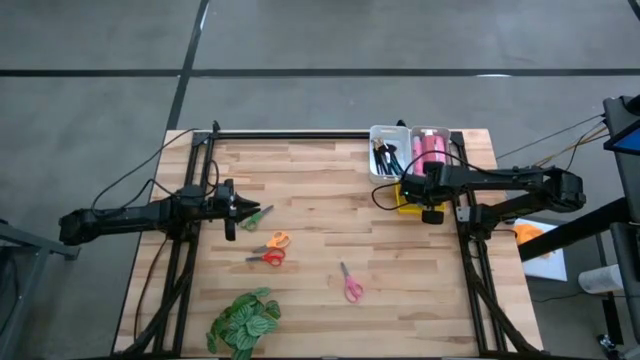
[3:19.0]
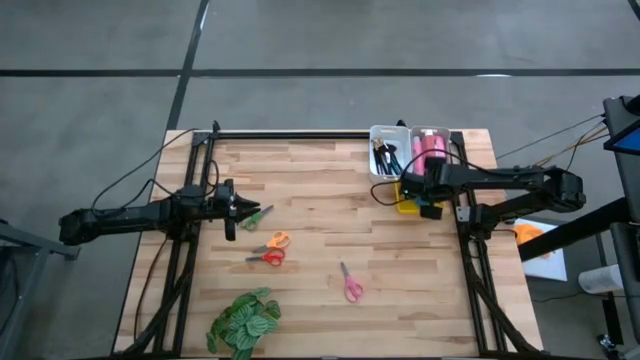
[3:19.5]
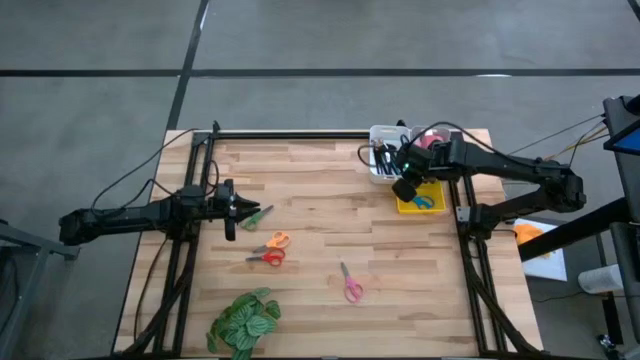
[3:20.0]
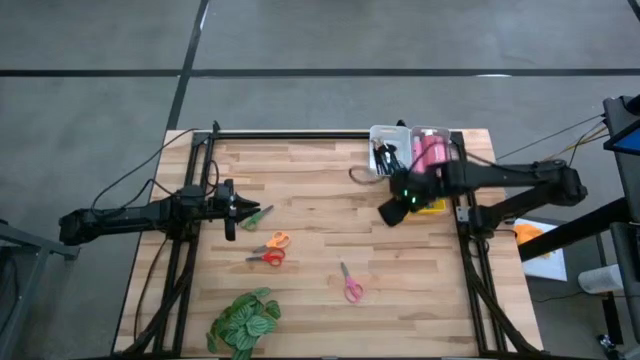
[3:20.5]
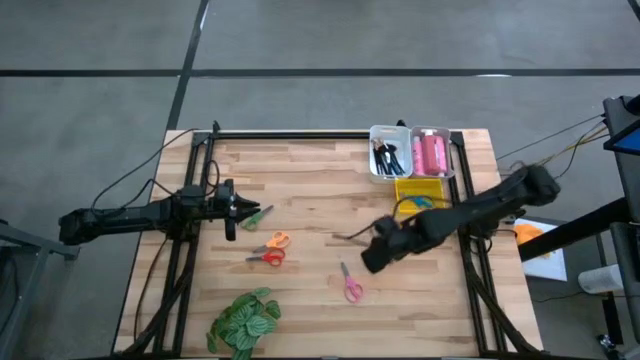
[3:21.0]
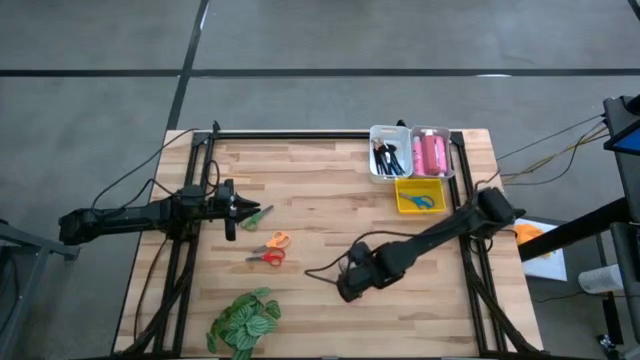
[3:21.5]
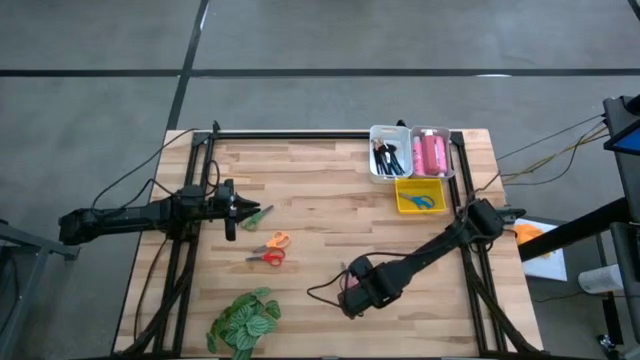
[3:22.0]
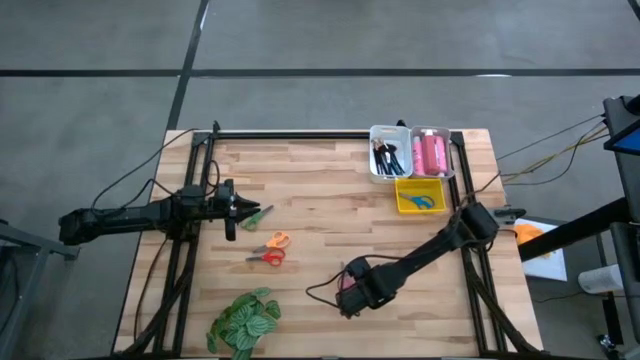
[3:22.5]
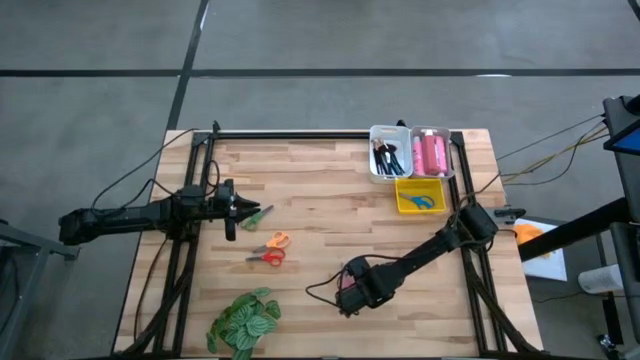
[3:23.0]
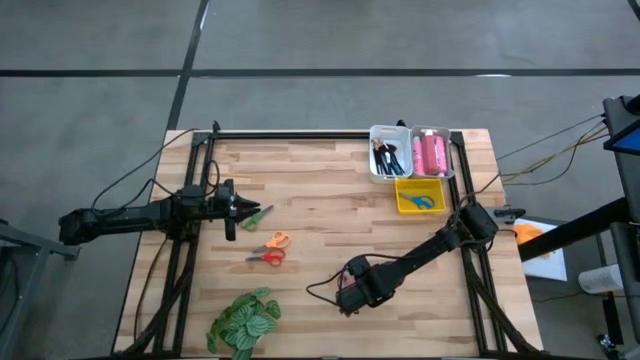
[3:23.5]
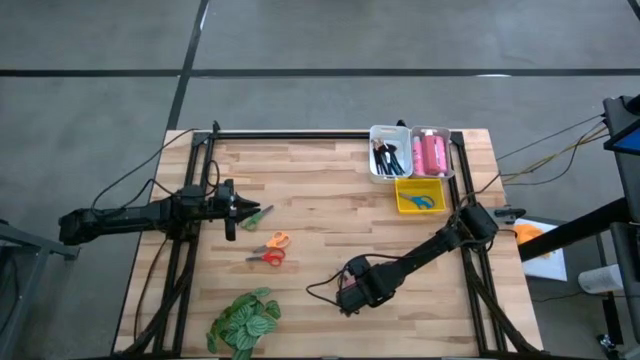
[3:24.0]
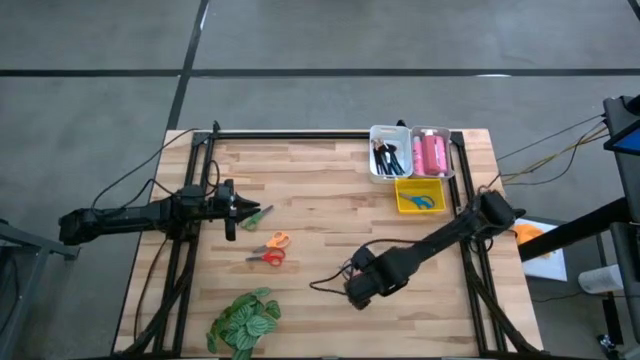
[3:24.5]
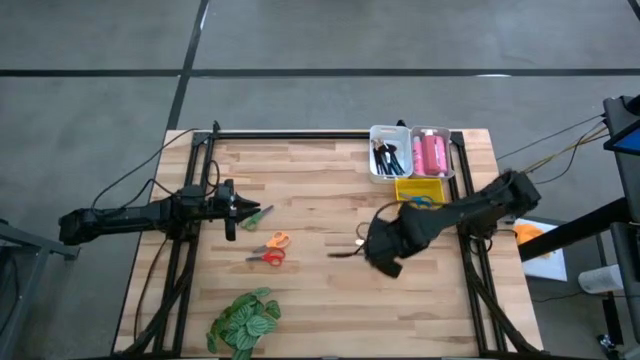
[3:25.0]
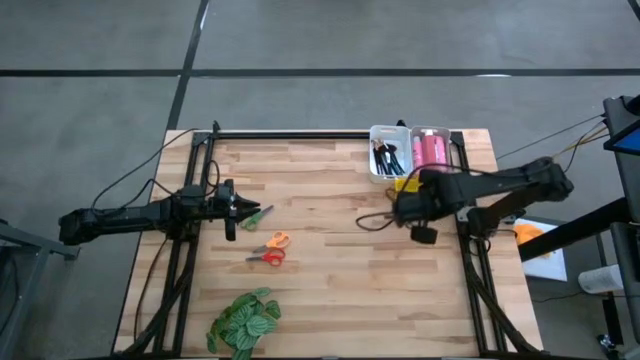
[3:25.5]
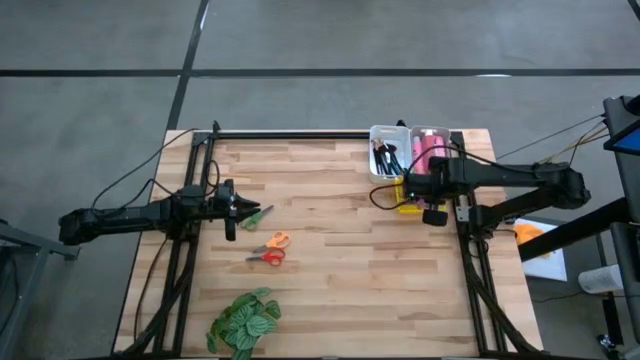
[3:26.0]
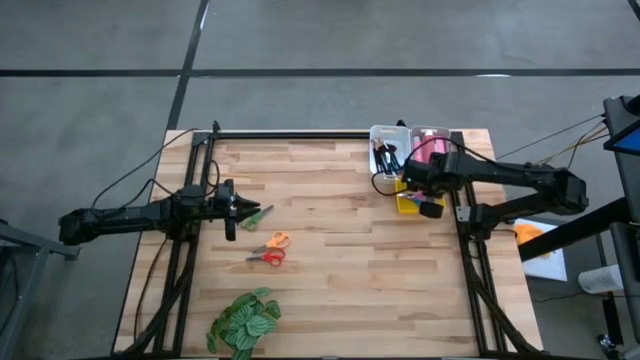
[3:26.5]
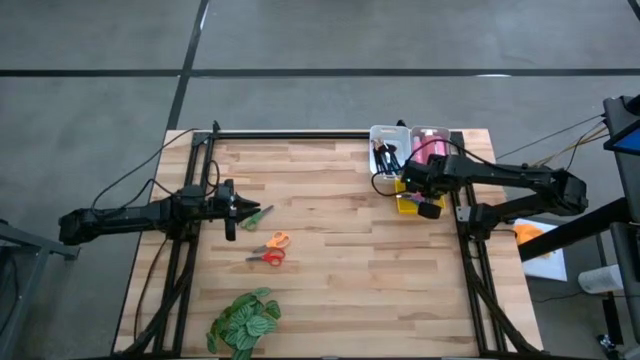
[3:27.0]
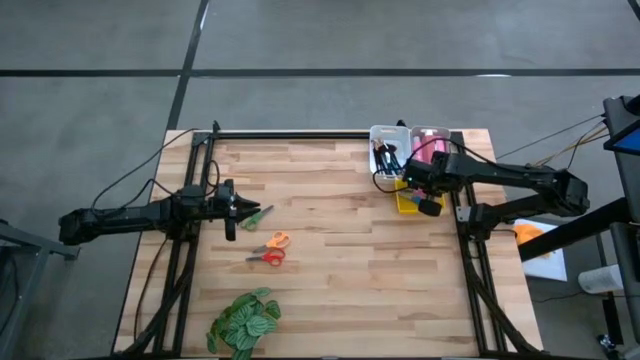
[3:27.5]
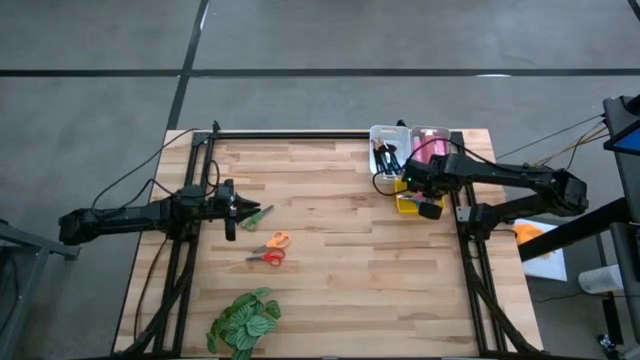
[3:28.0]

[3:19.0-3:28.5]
Task: Pick & Place Paint Supplies
Put the pink scissors into the yellow bin

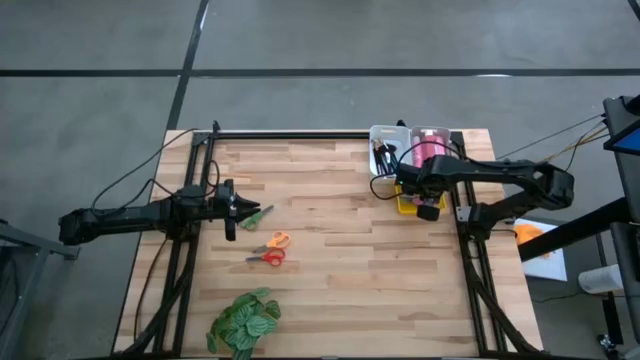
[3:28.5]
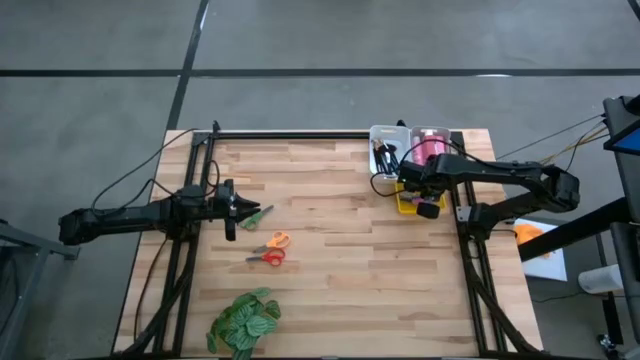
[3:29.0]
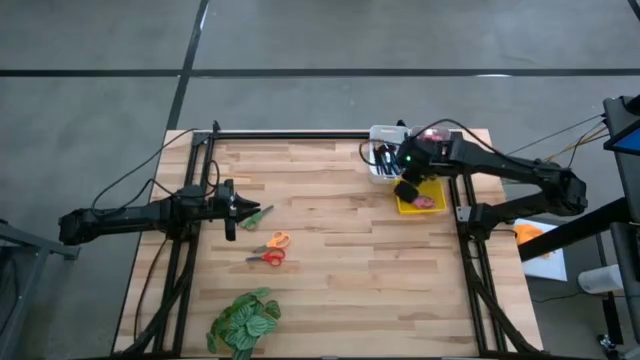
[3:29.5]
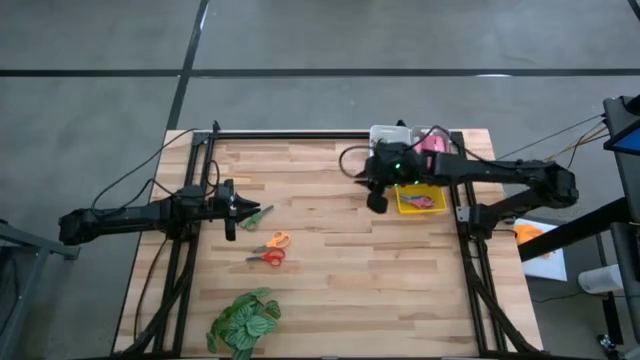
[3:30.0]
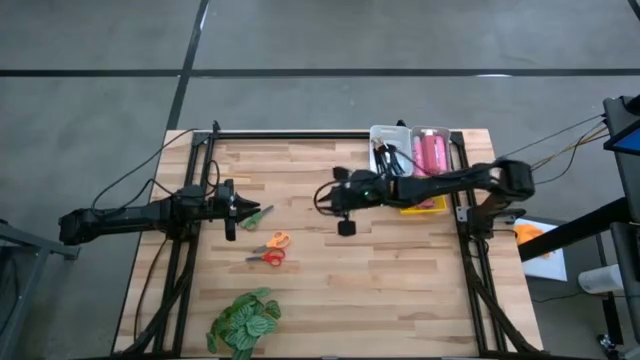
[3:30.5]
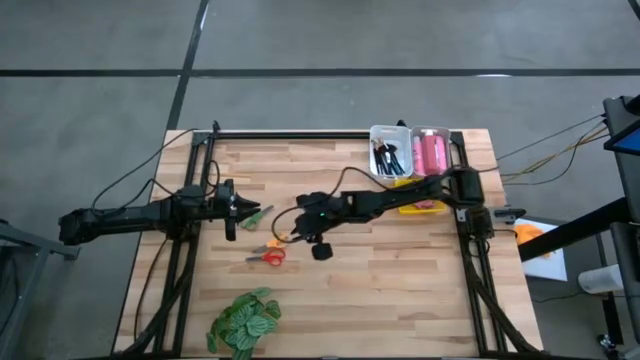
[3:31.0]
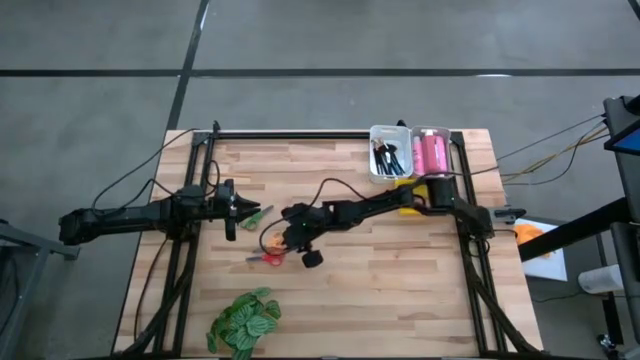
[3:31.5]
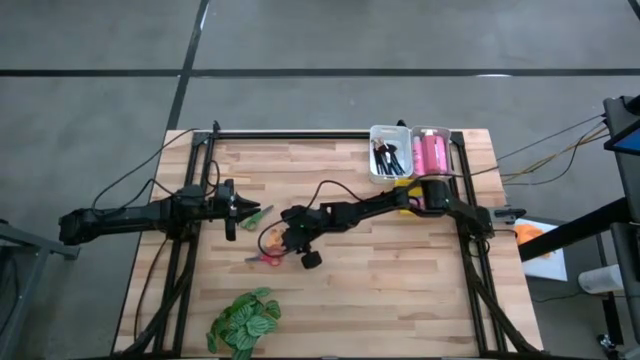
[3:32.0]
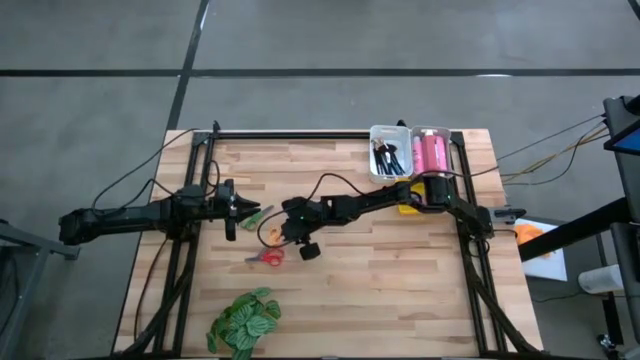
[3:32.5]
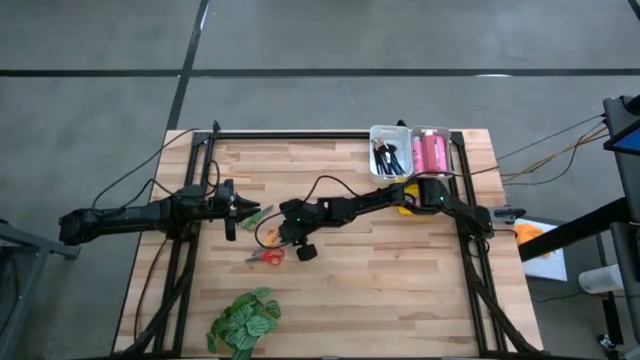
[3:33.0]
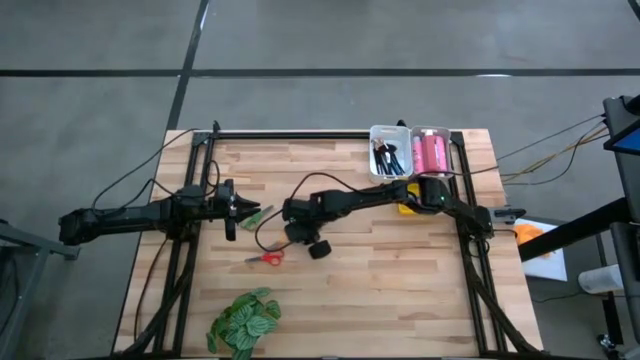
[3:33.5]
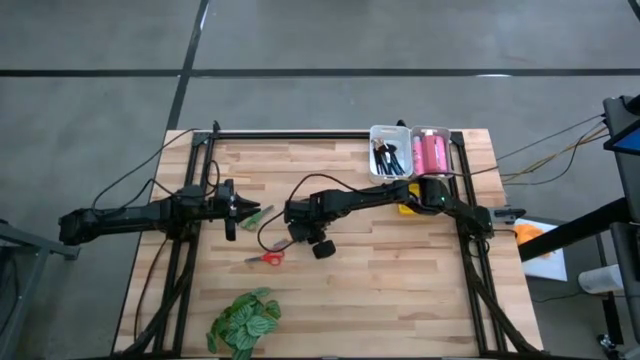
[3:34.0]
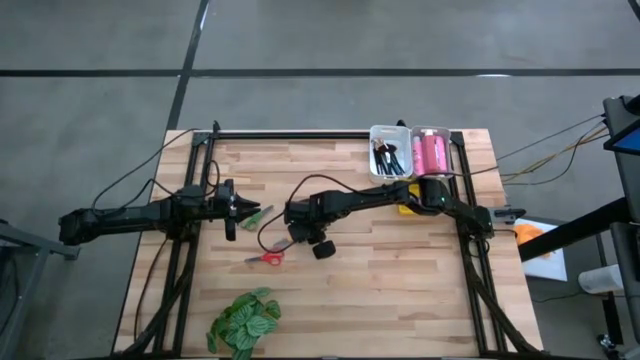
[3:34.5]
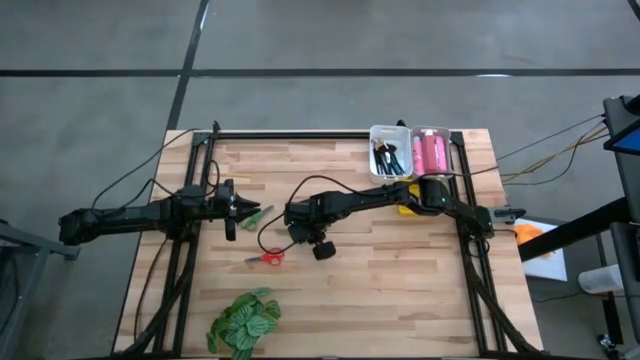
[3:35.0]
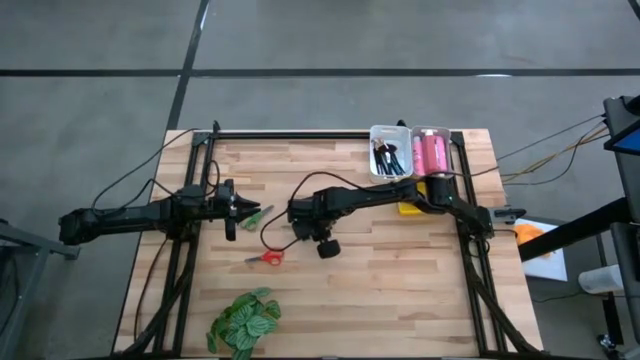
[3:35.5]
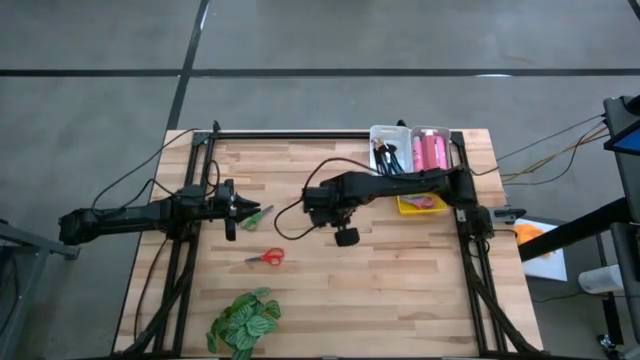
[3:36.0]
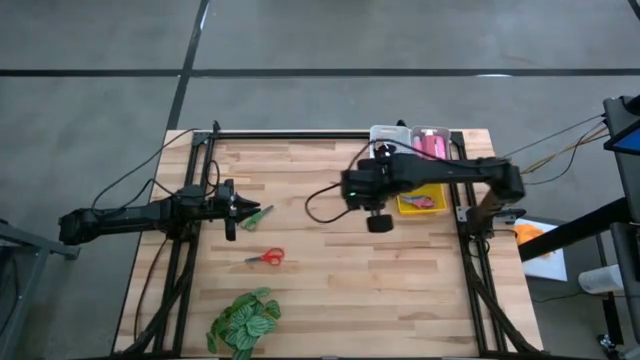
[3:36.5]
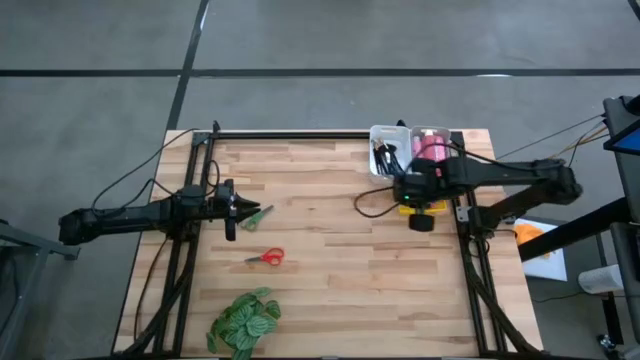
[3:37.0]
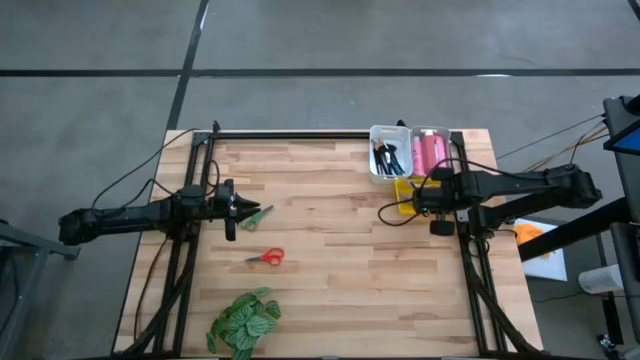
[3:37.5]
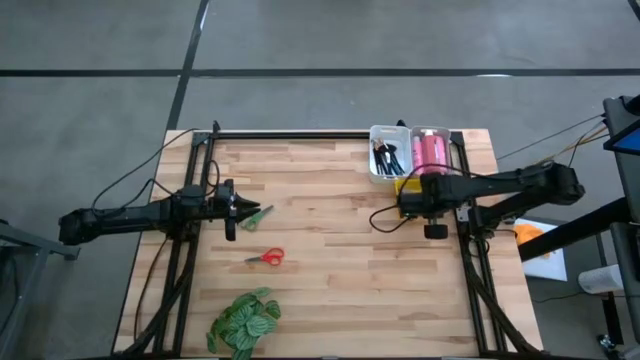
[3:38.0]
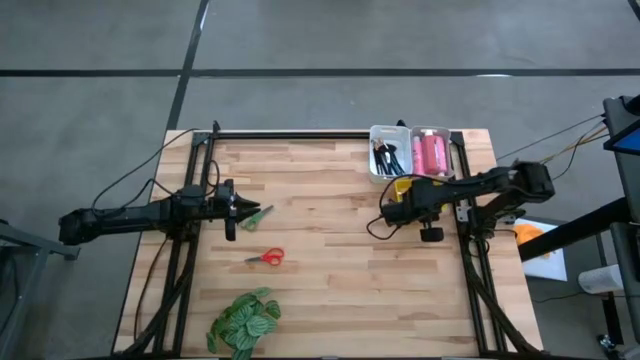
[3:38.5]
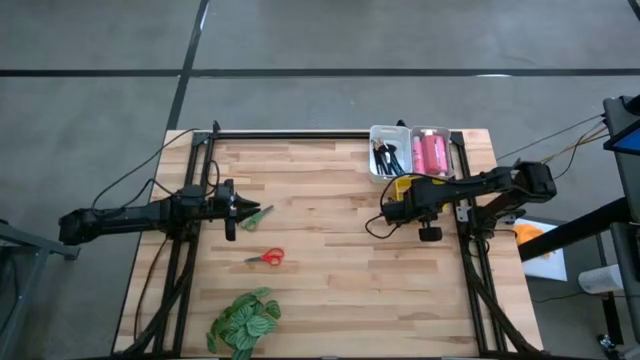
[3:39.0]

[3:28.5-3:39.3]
Put the orange scissors into the yellow bin
